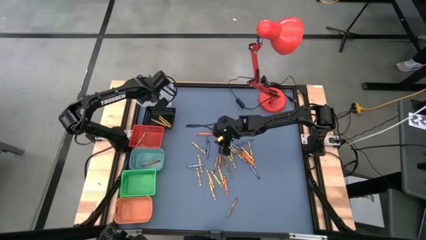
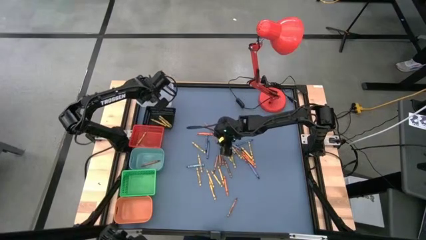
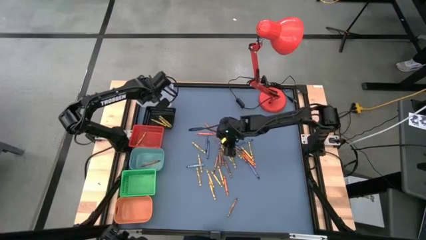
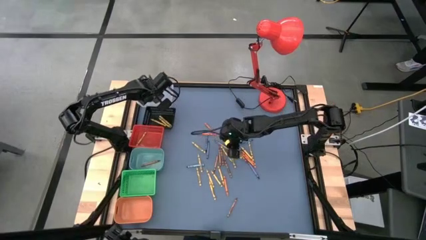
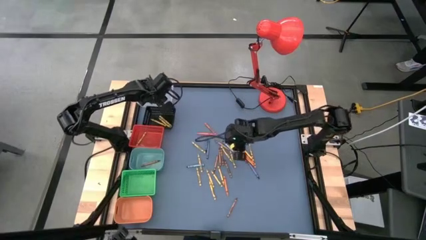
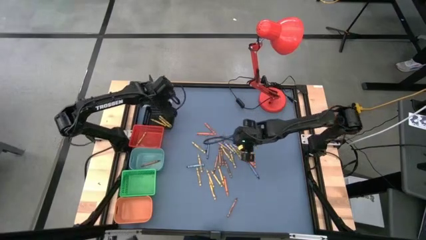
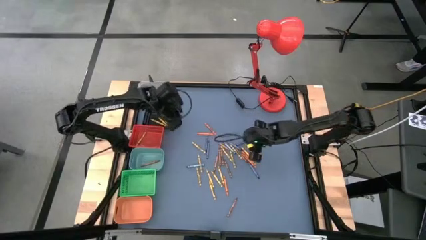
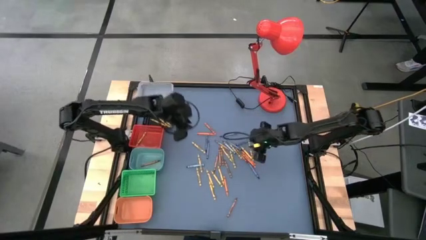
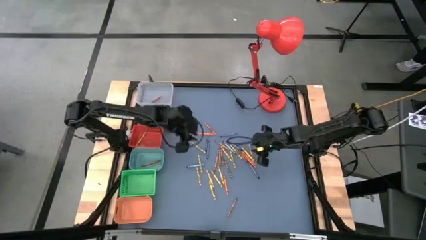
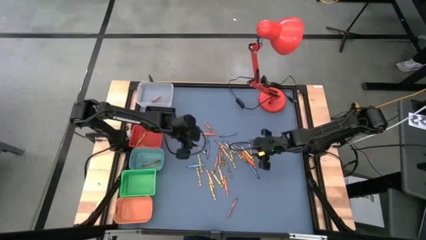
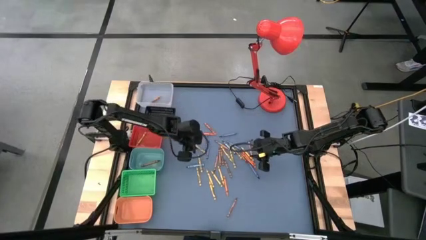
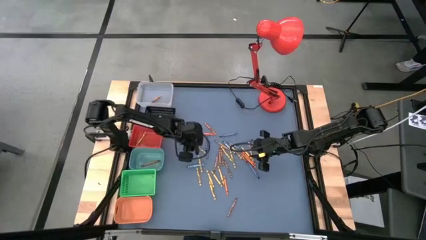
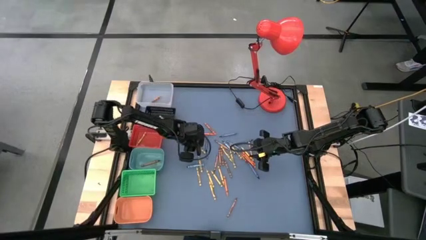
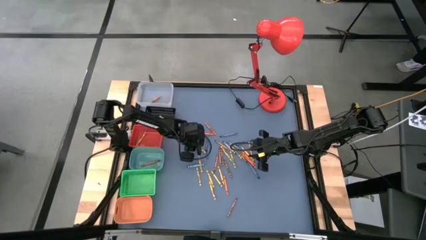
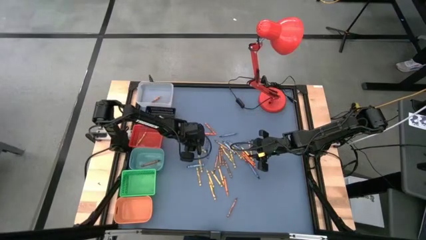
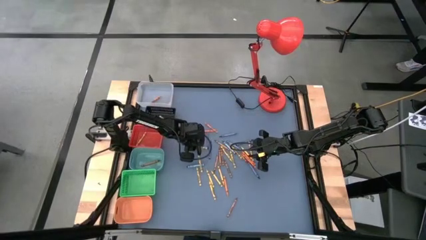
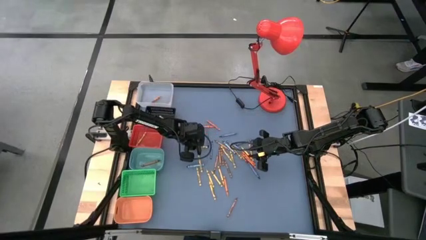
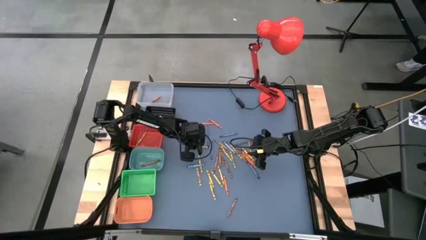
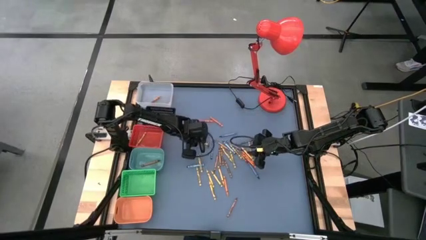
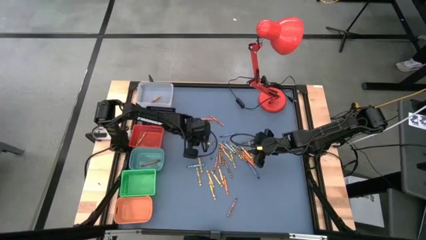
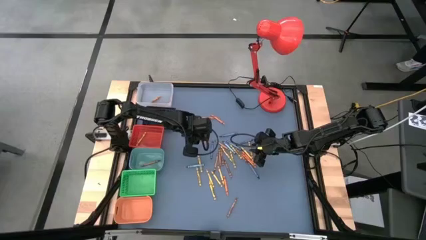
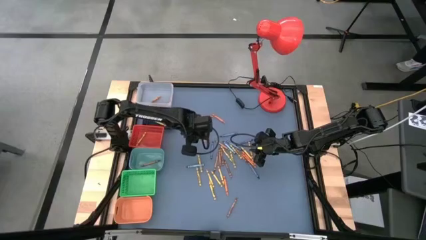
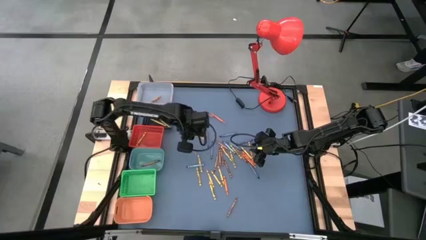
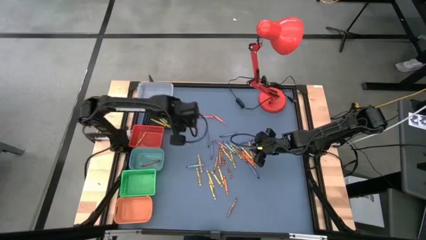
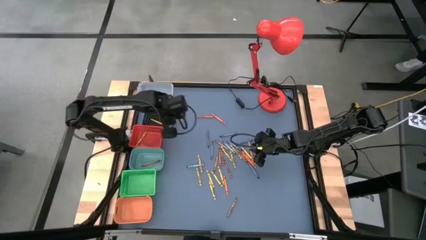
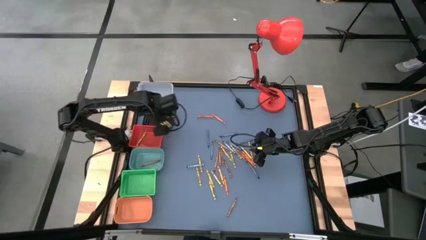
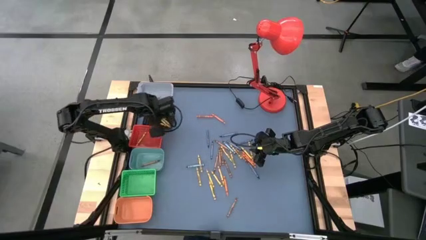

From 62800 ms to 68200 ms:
Task: Sort crayons
Put the green crayon into the black bin

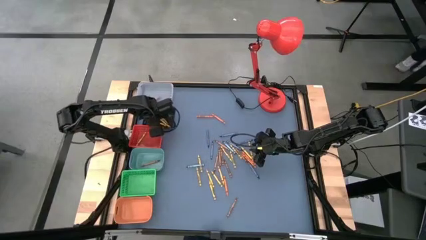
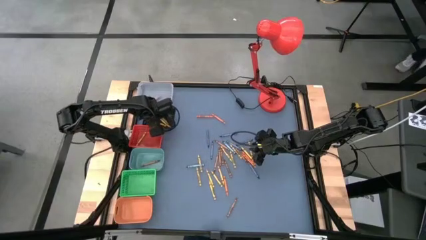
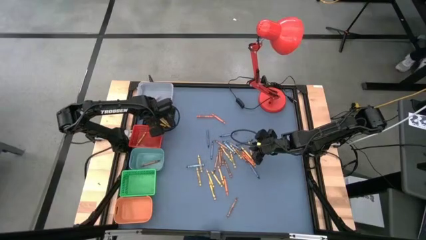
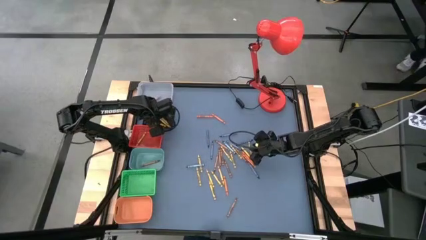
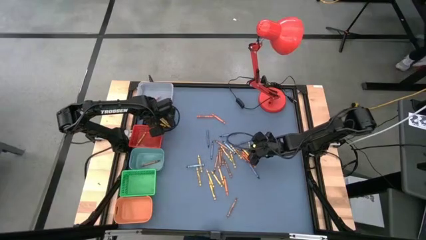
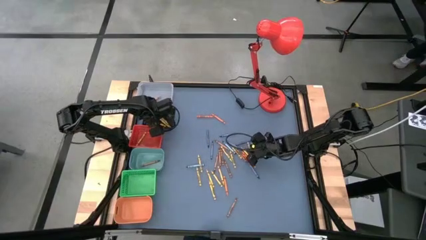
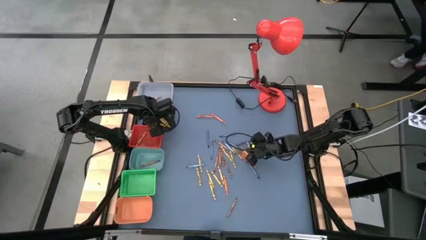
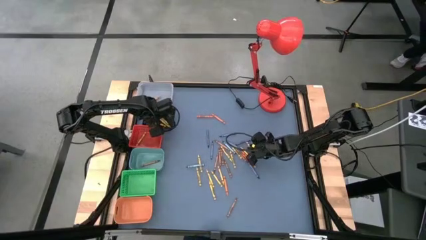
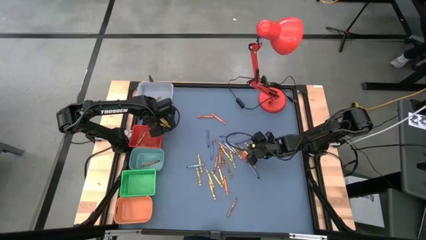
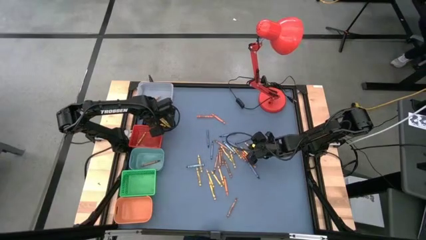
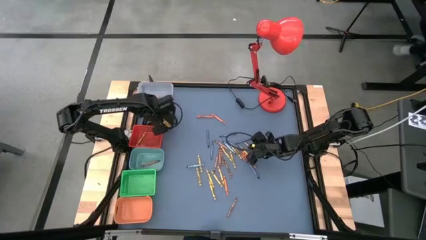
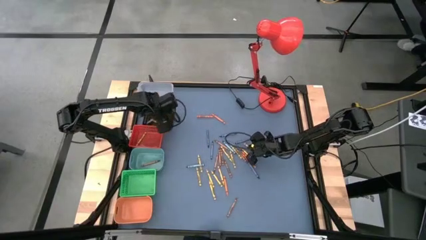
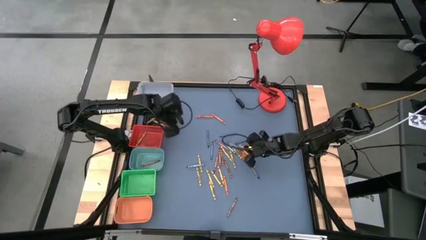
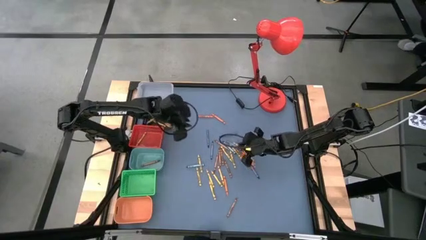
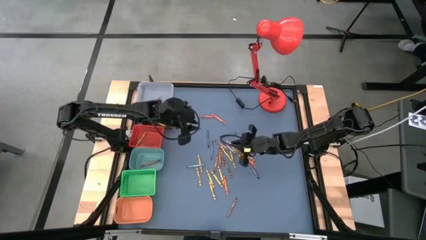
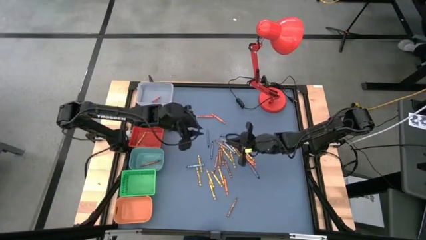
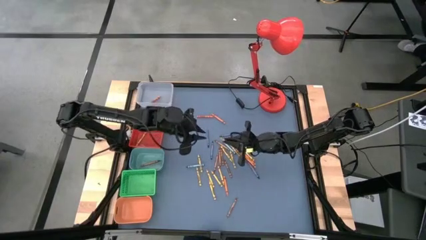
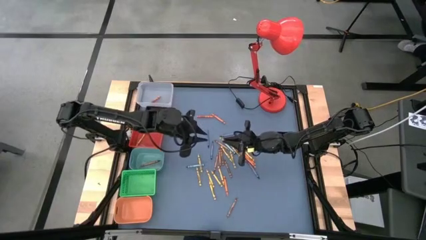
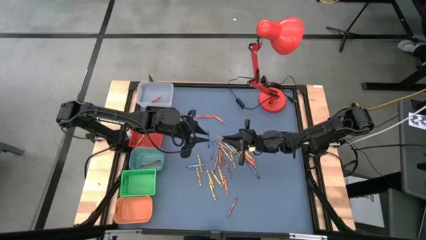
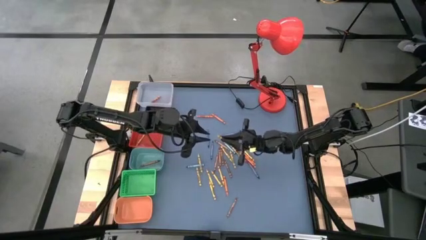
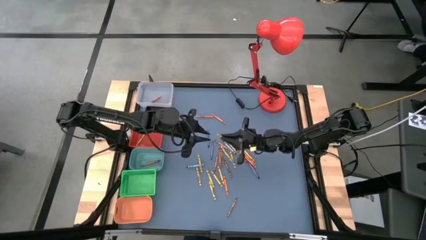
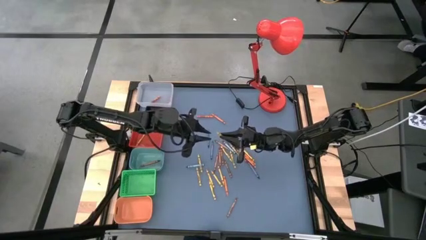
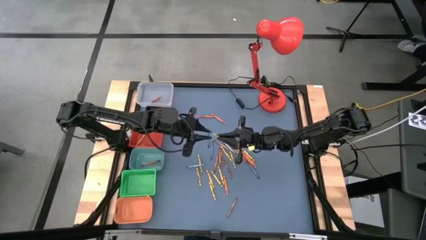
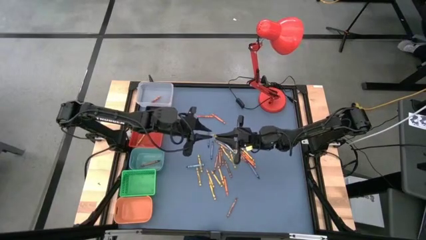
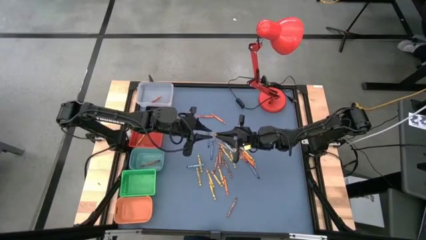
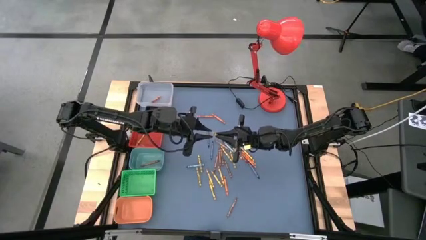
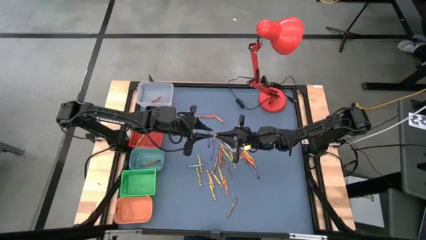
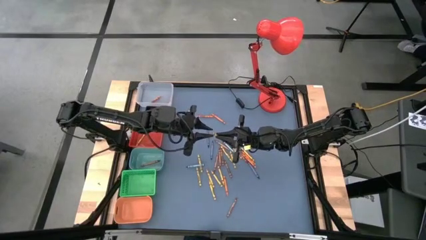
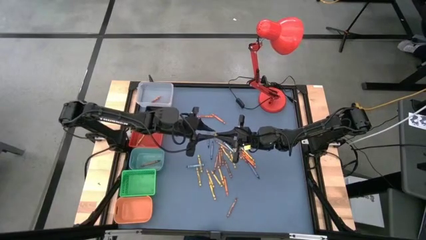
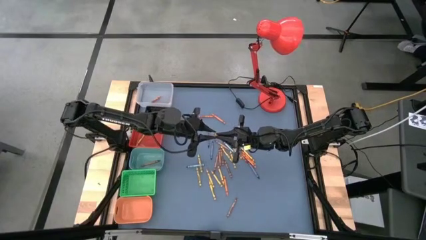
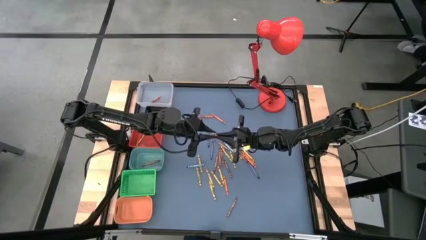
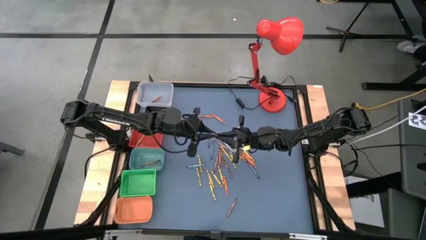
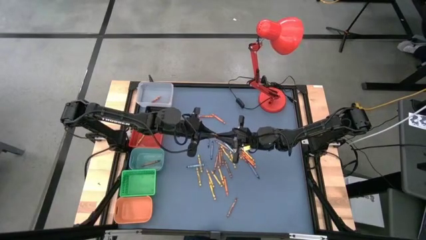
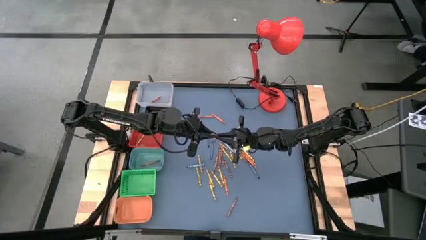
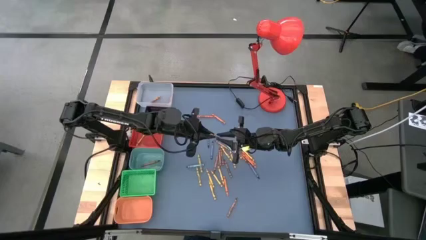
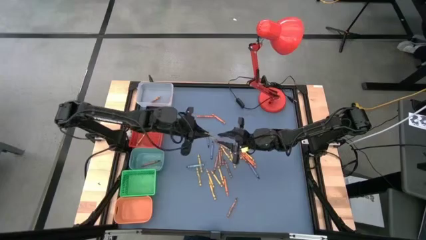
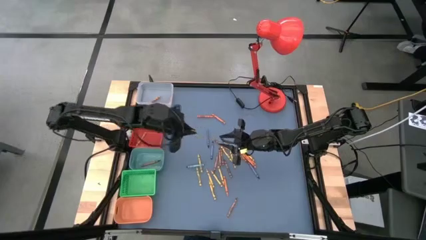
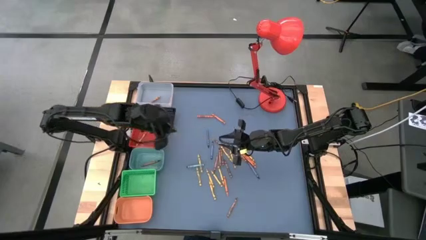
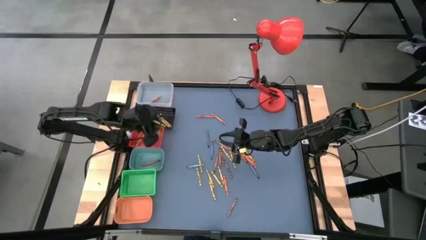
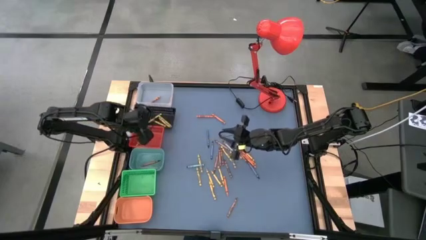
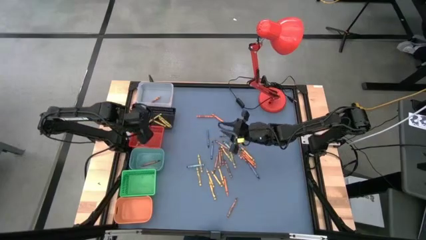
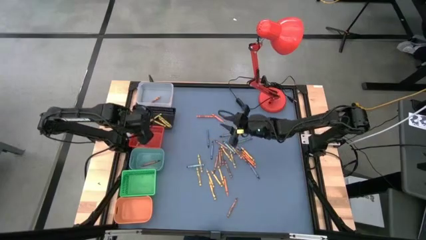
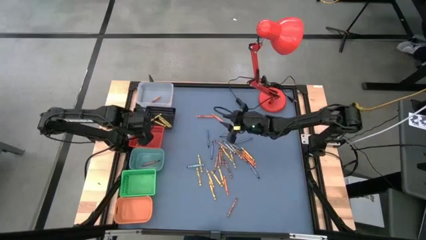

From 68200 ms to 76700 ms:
Put the yellow crayon into the orange bin

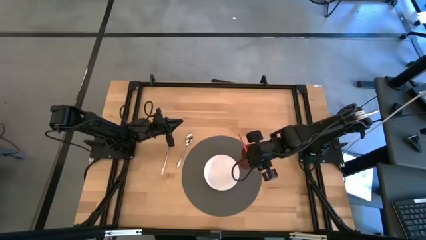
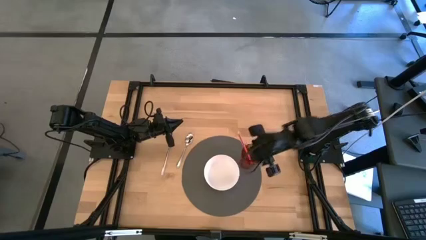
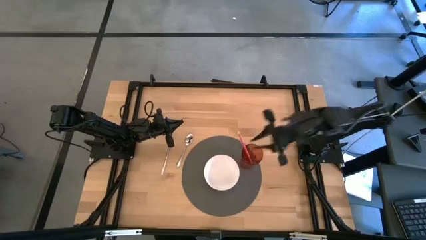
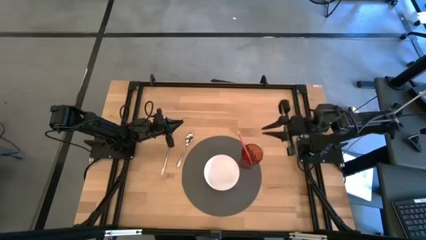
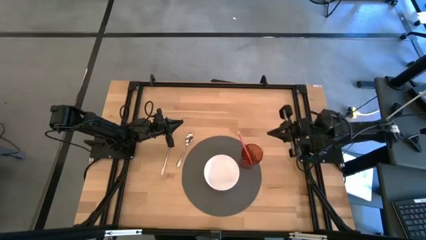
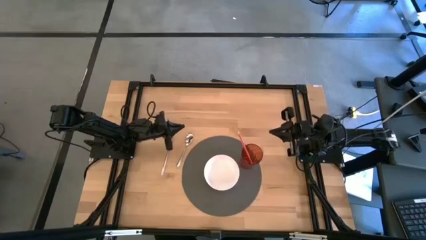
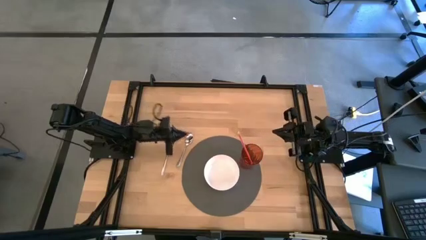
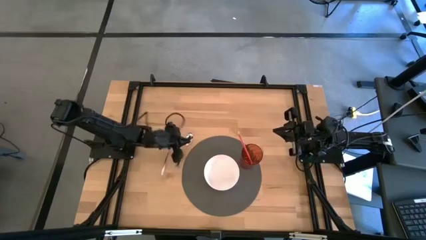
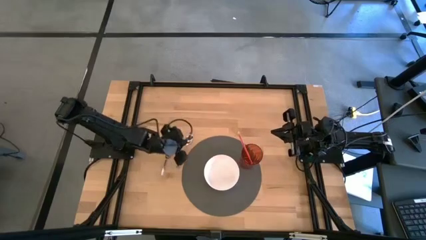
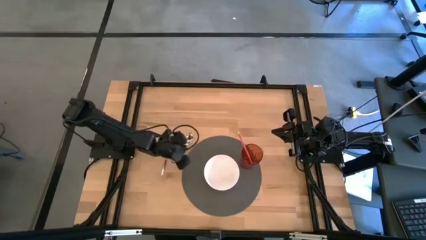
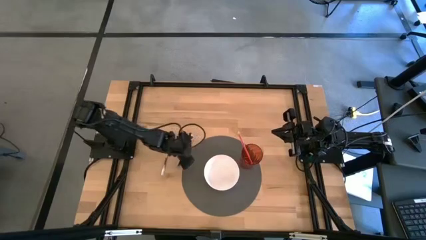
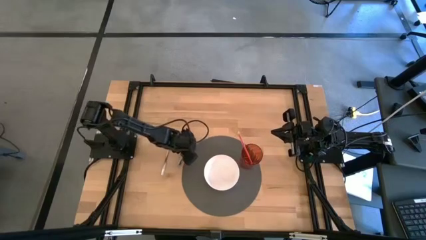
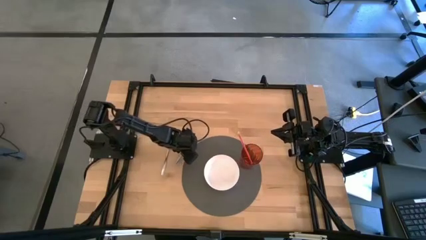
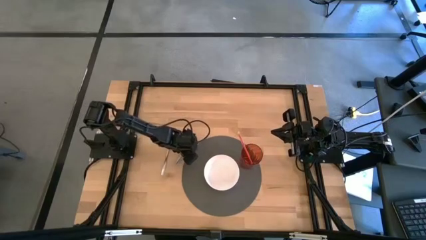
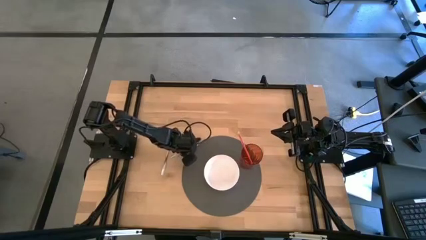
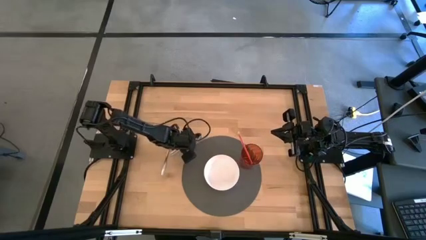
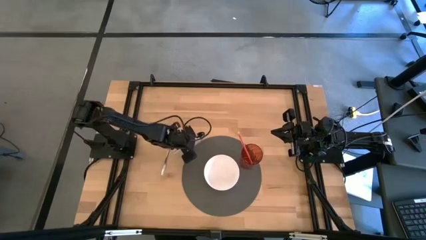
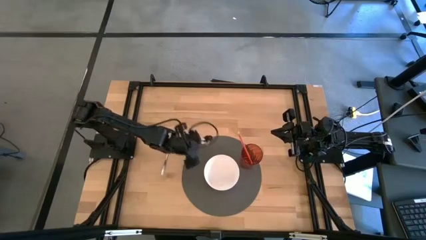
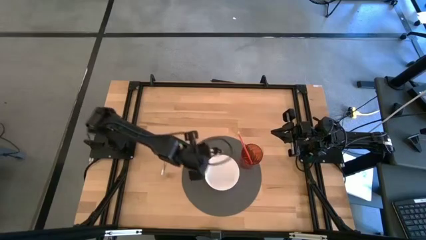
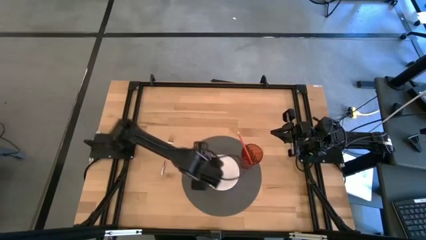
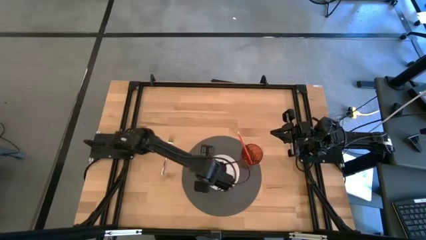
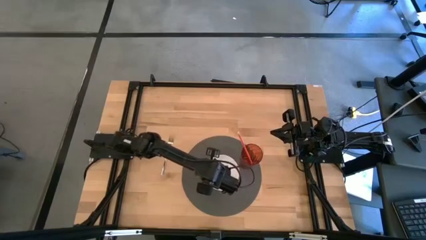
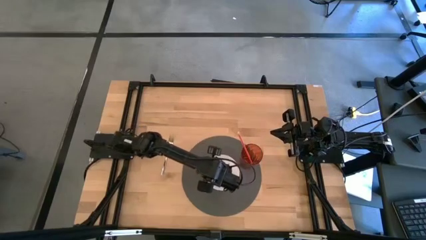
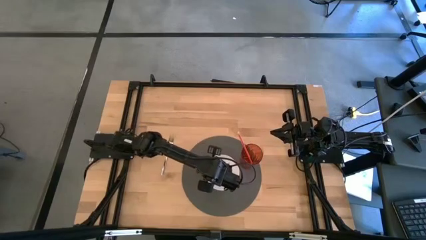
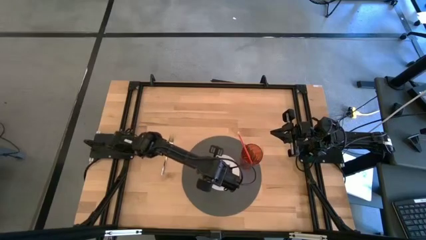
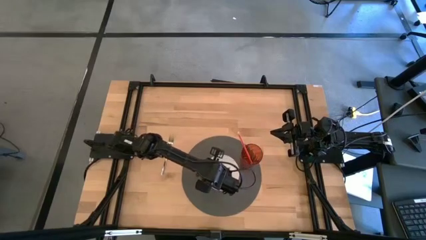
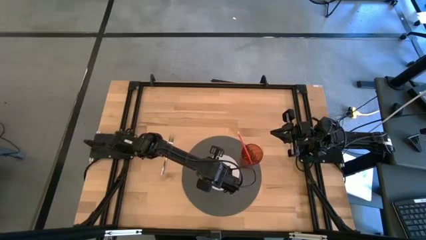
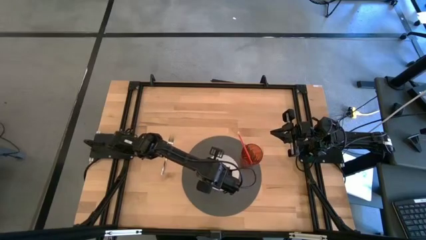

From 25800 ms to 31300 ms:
Task: Pick & Place Utensil
Put the silver spoon into the white bowl
